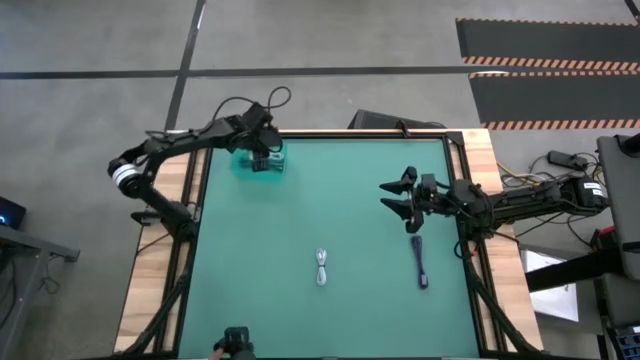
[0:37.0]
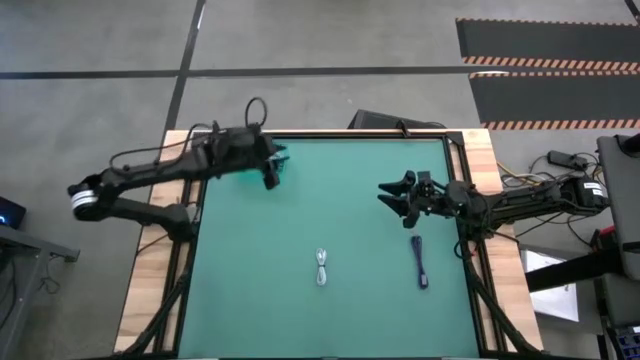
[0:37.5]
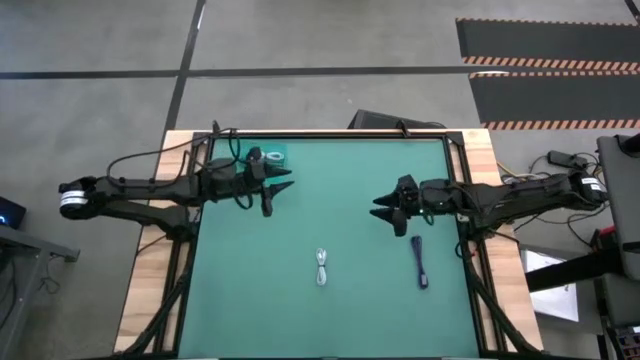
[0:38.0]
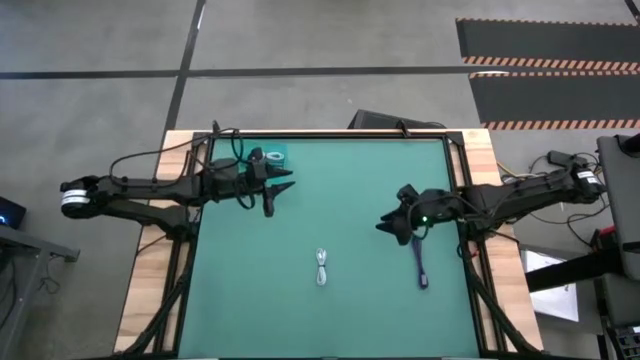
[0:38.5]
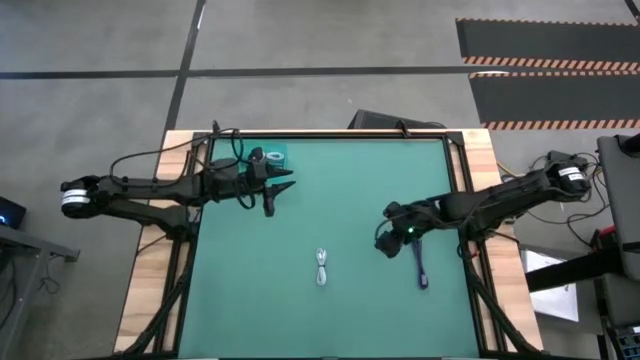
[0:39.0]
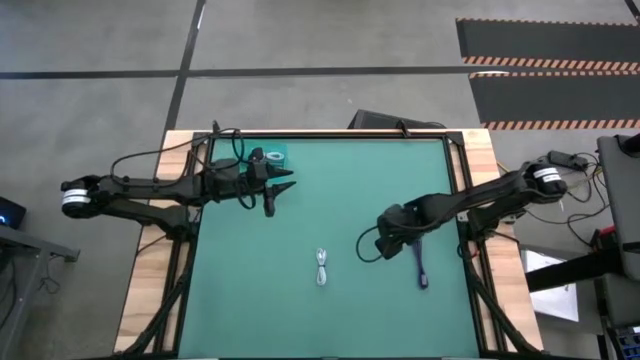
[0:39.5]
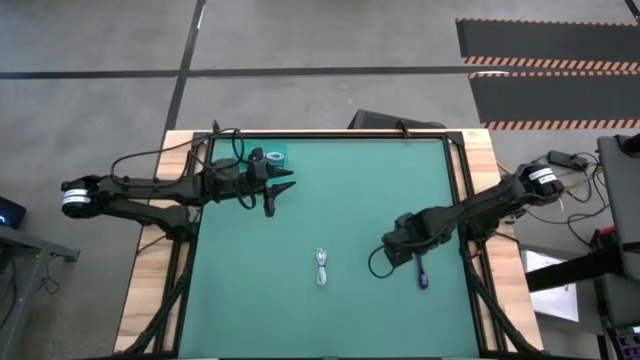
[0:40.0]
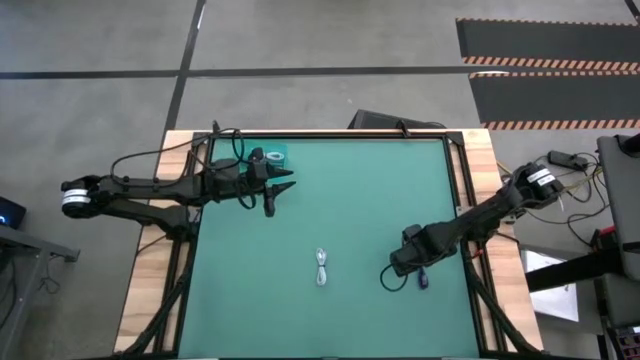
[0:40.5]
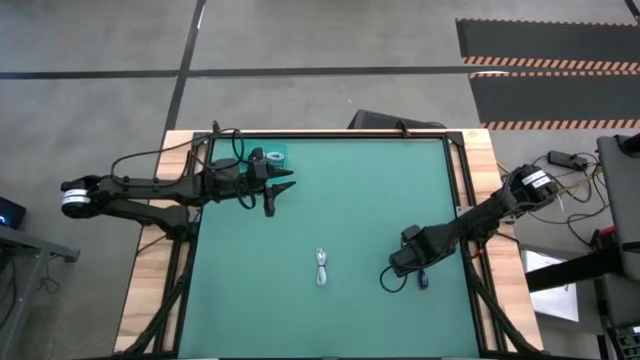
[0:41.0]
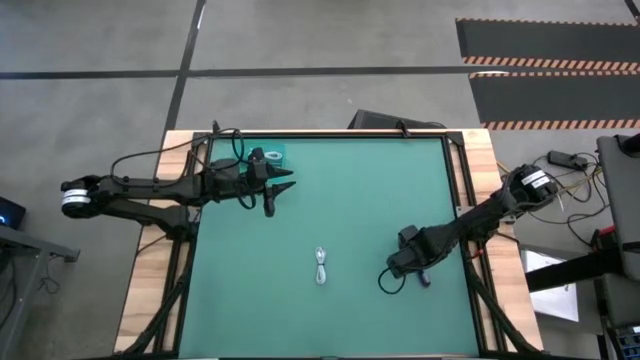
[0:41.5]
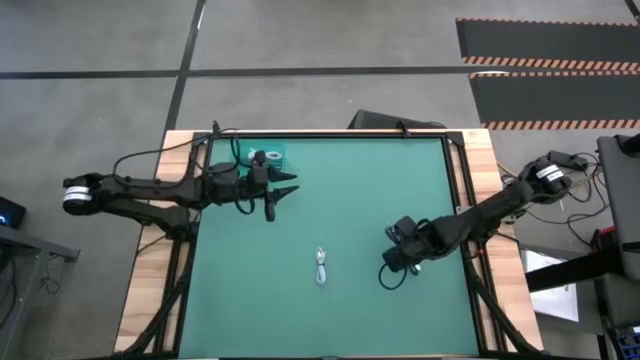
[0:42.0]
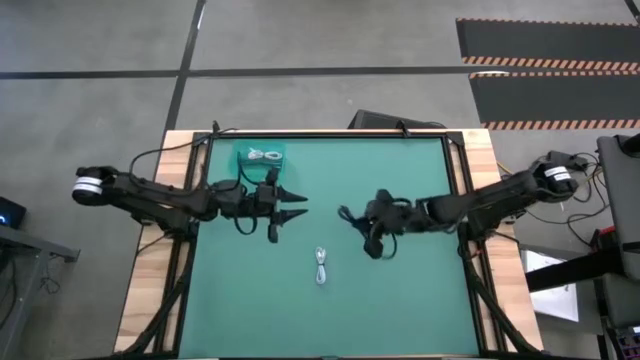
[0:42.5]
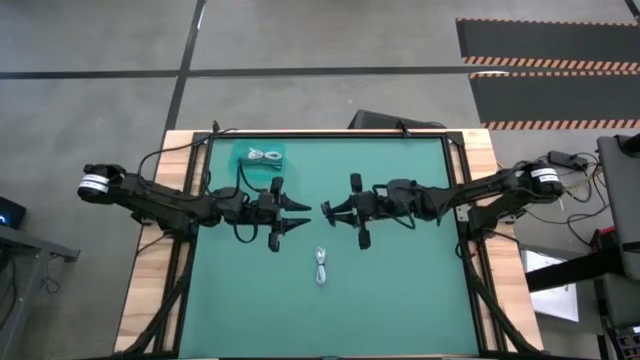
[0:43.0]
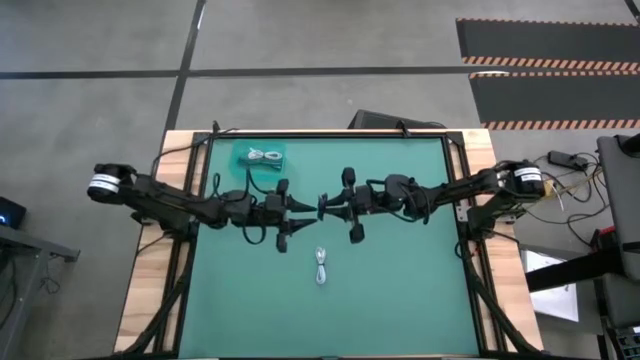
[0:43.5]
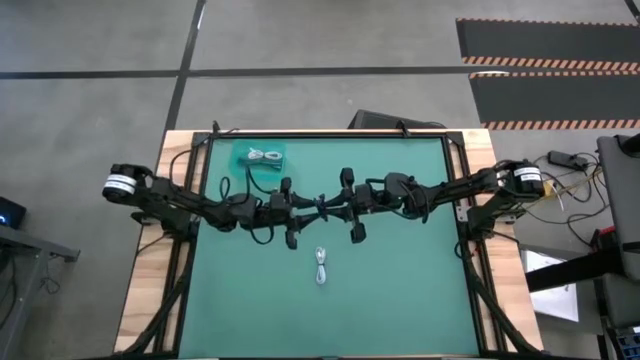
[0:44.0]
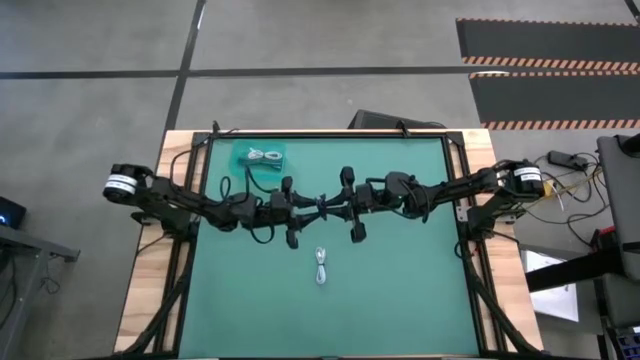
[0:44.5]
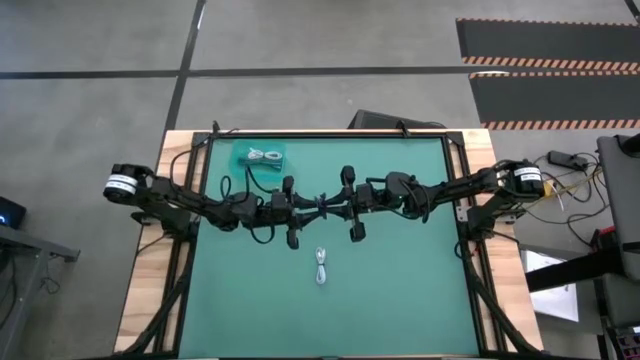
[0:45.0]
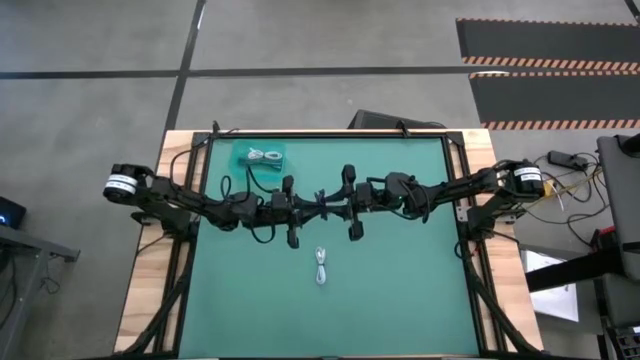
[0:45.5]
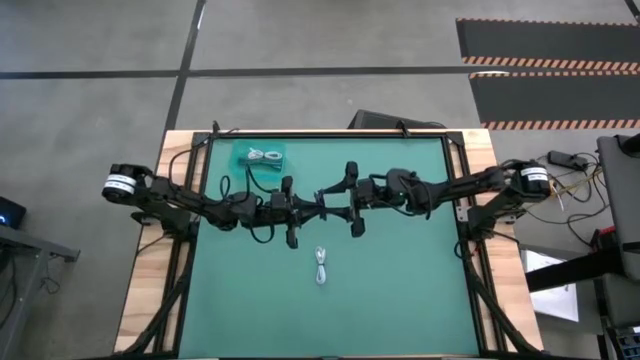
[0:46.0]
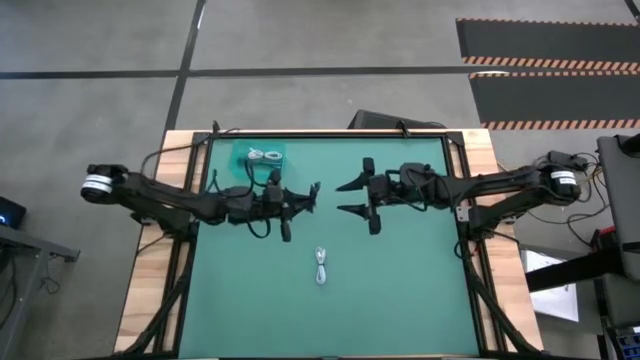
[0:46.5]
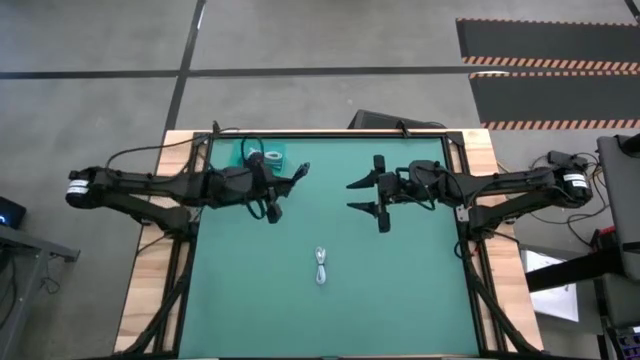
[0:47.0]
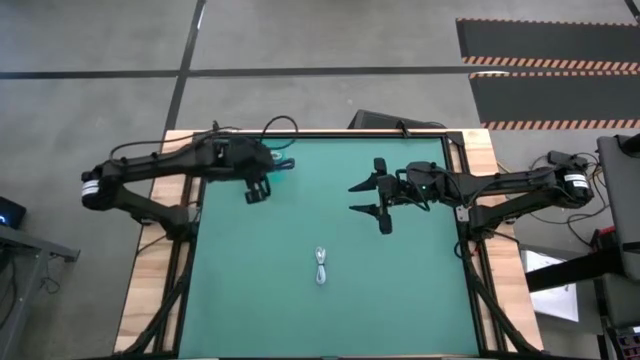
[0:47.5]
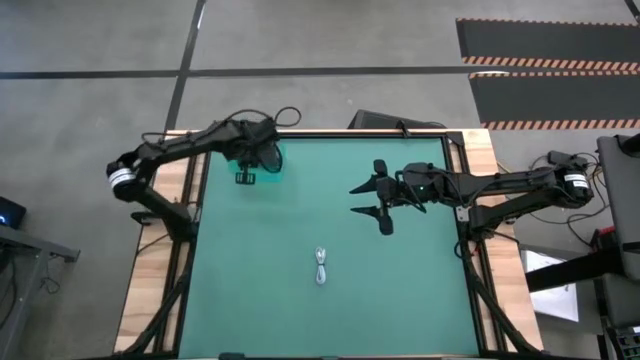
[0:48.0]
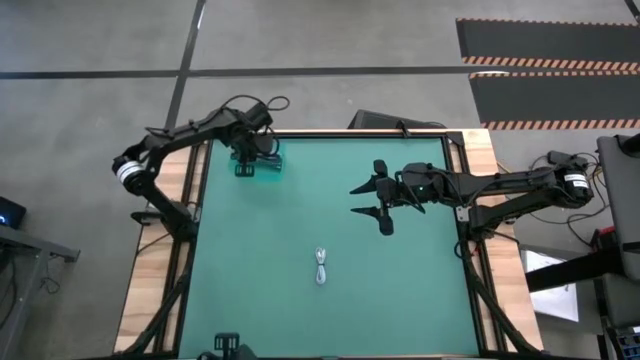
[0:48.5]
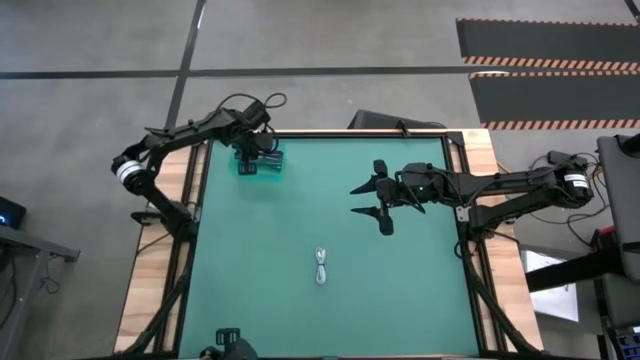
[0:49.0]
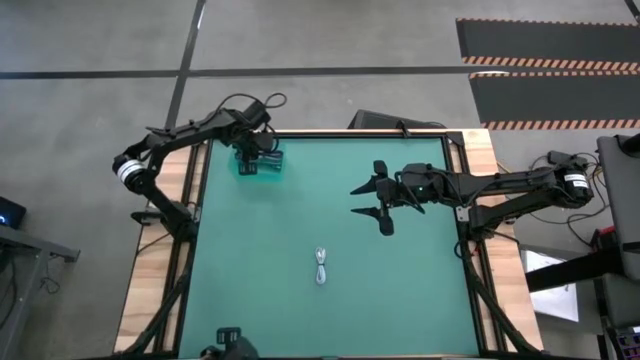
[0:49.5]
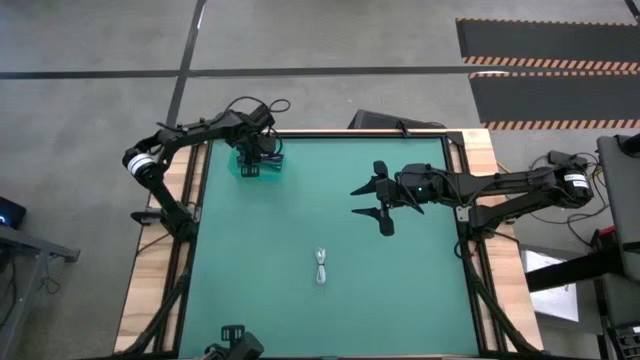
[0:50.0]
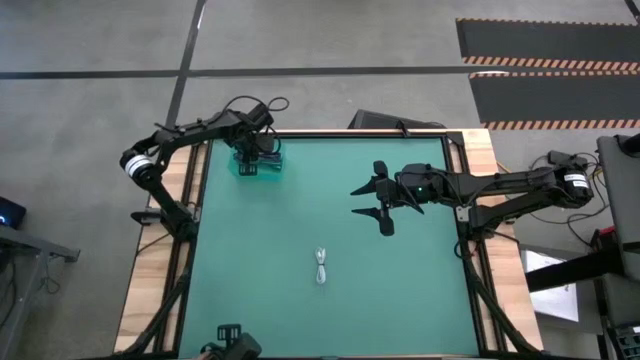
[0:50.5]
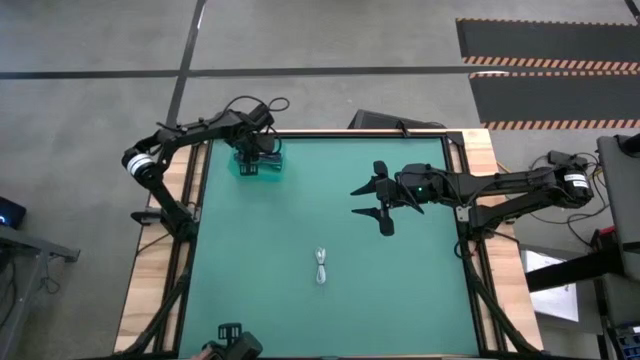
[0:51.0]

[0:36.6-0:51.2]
Task: Pick and place USB-C Cables
Put the violet USB cable into the blue bin
